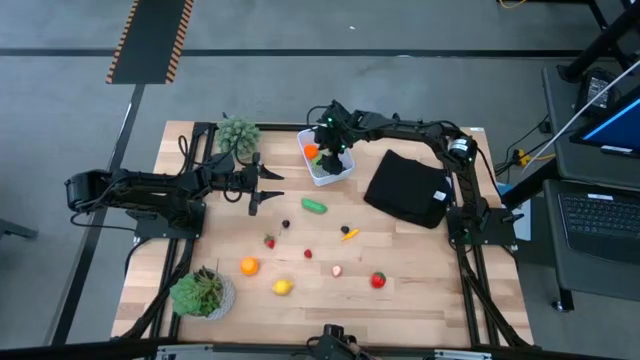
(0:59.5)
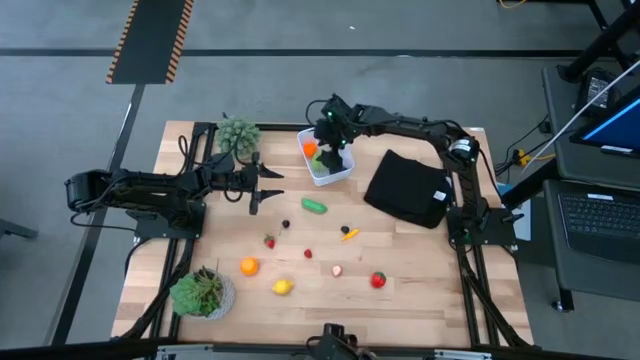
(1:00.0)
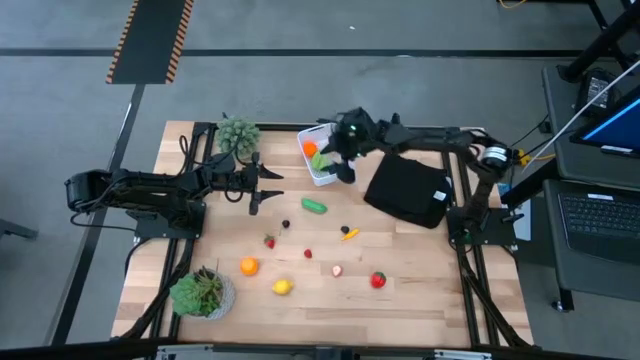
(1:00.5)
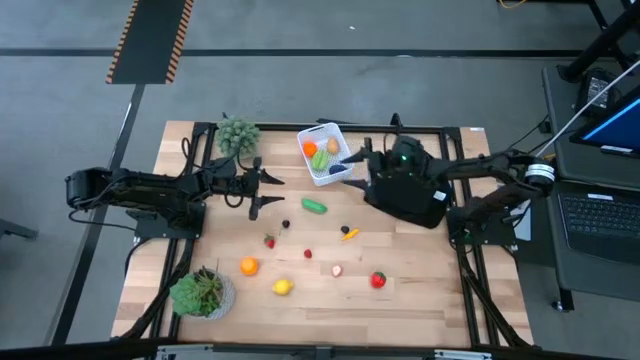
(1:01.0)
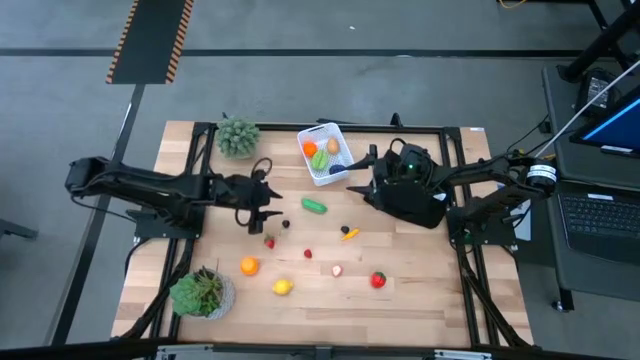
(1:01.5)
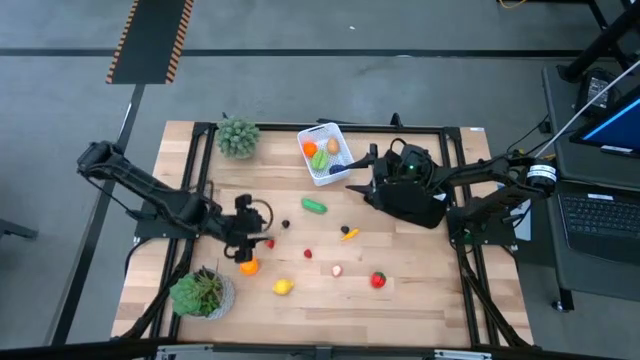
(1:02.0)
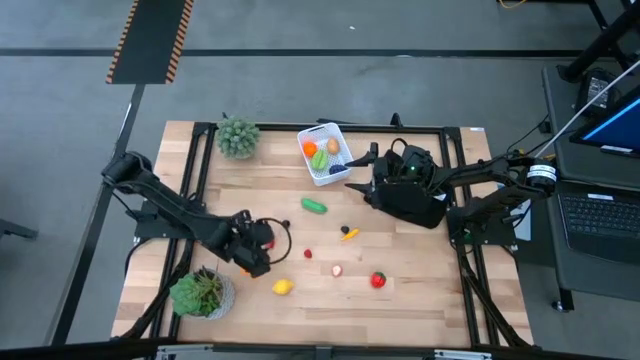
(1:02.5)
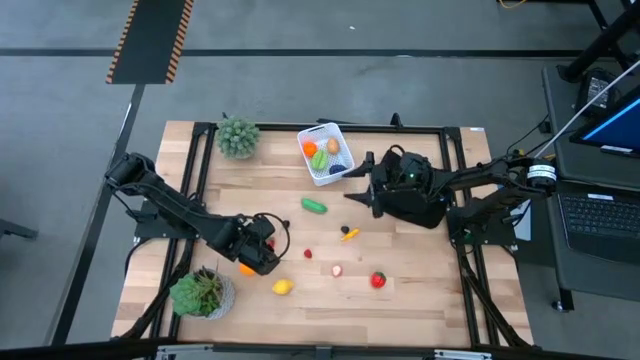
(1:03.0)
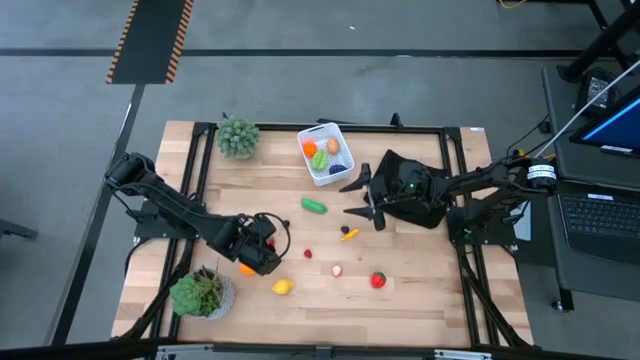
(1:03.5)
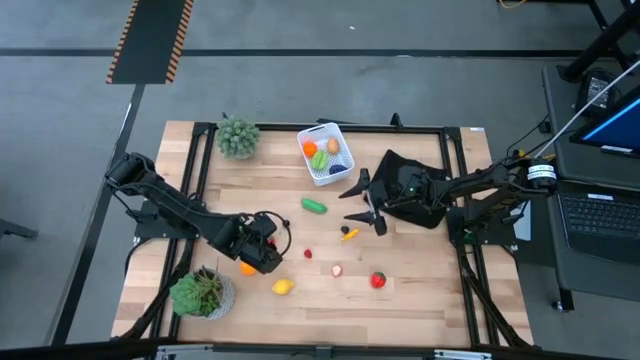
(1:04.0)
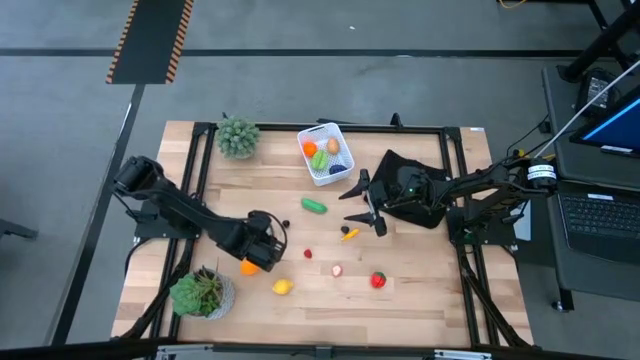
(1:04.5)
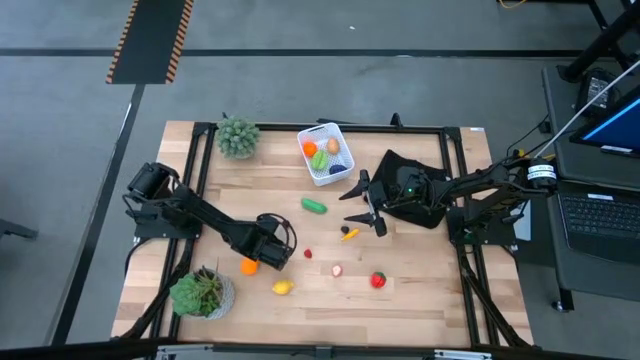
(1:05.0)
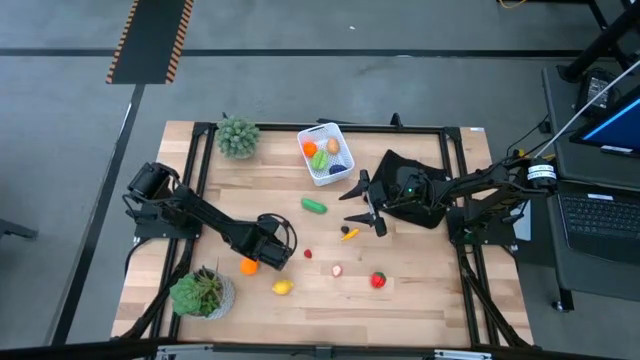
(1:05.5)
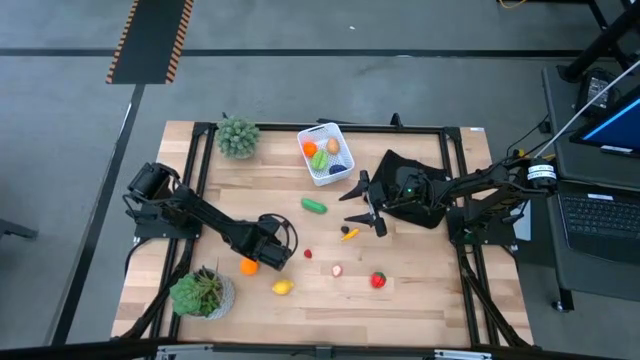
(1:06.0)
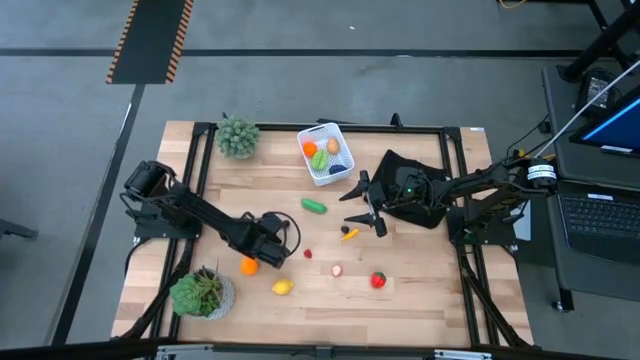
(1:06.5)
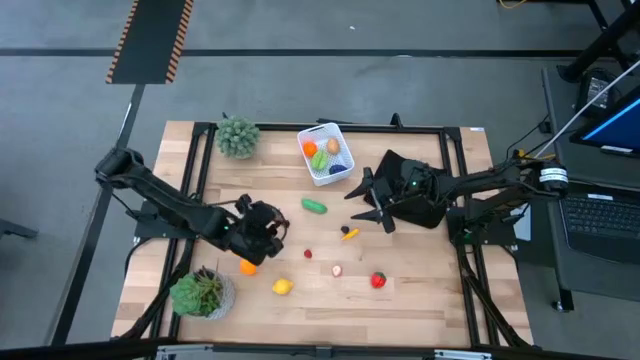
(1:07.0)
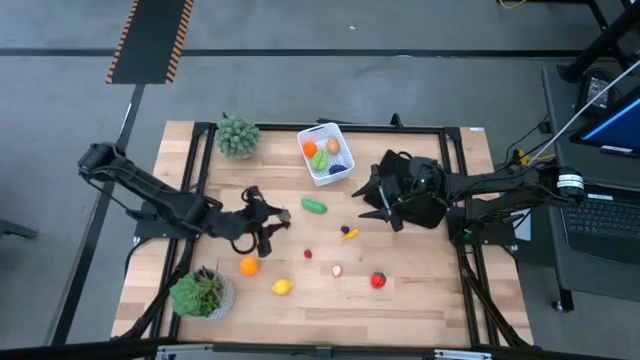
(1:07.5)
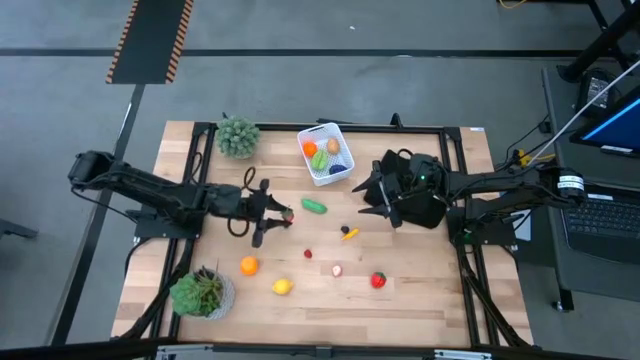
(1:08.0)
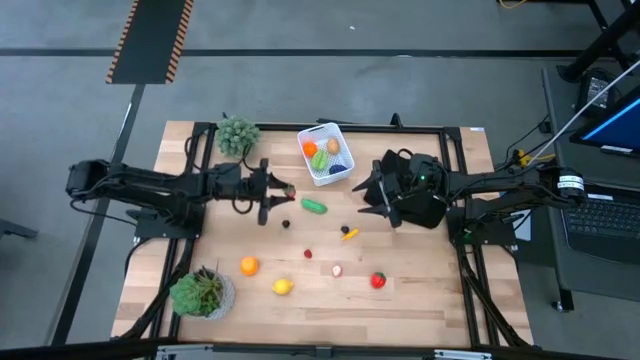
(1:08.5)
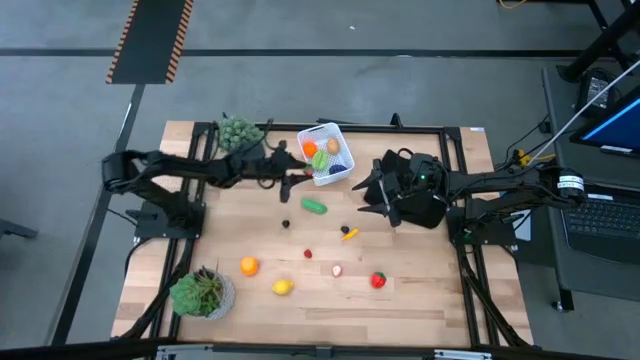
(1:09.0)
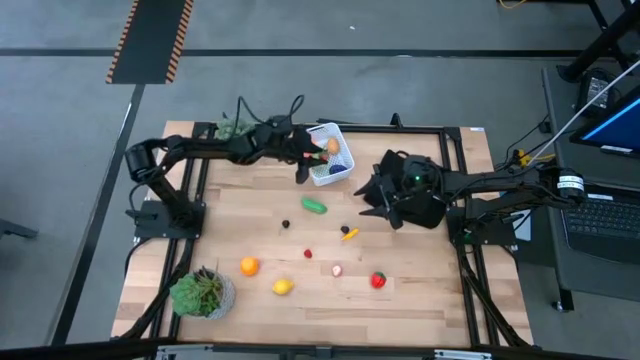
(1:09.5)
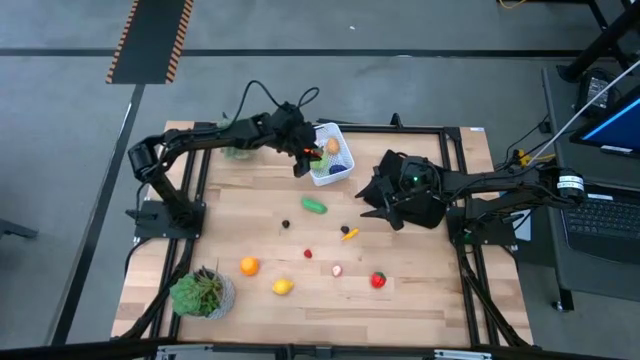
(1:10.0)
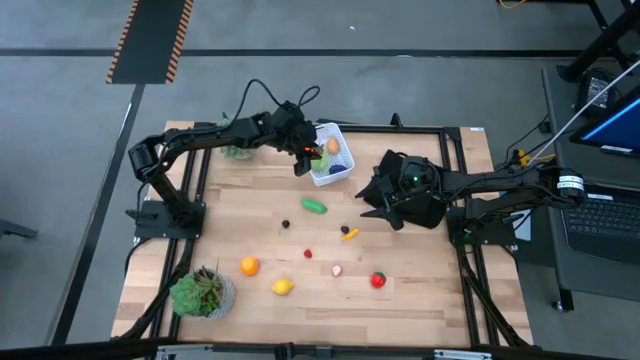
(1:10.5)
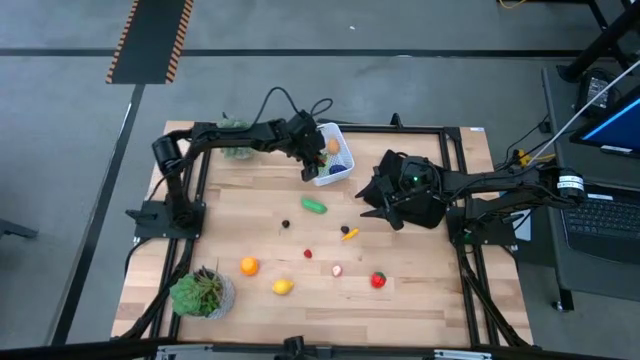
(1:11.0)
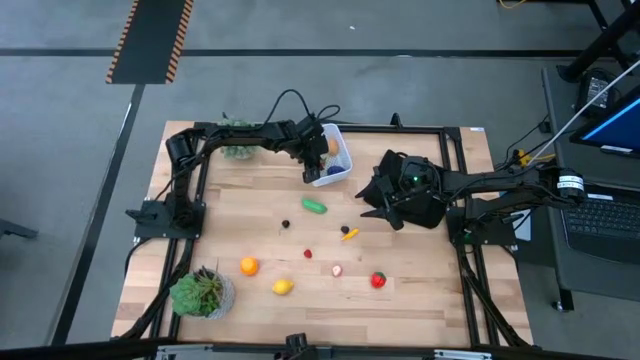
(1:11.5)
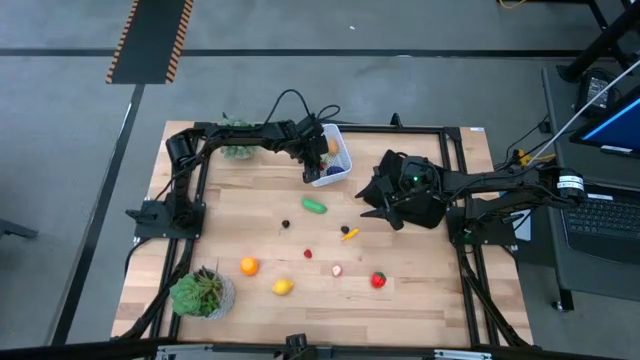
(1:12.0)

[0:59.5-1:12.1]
Task: Pick and placing Produce into tupperware
Put the top strawberry into the basket

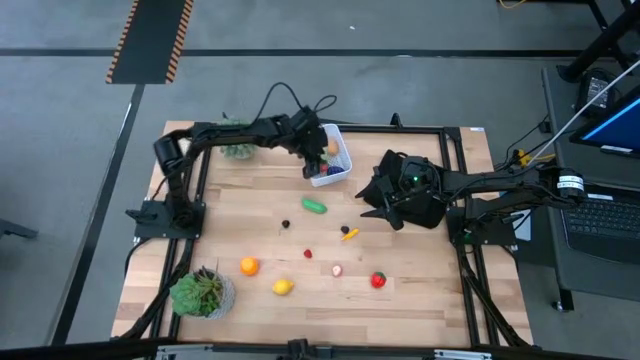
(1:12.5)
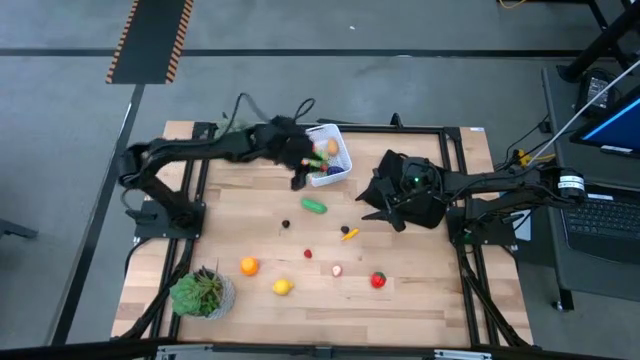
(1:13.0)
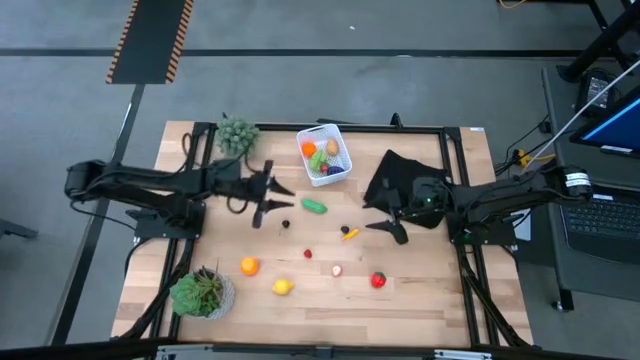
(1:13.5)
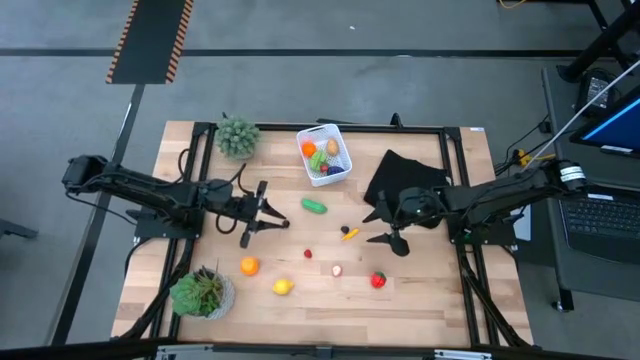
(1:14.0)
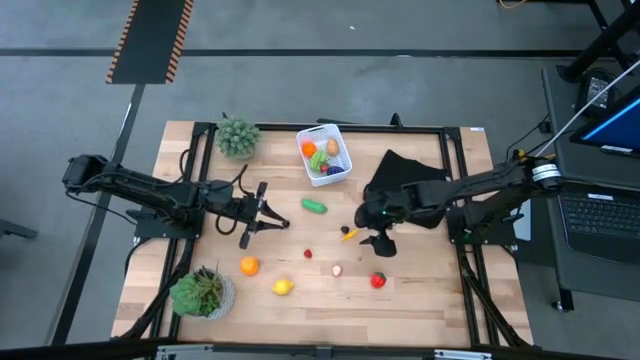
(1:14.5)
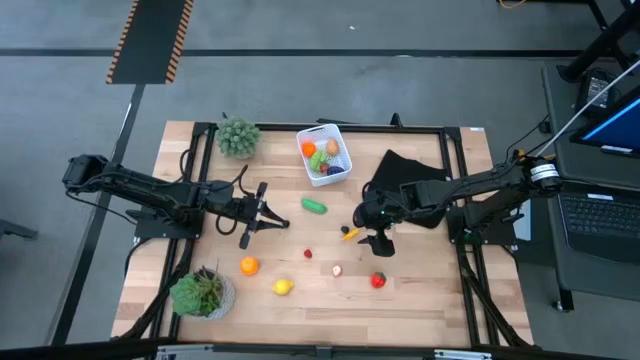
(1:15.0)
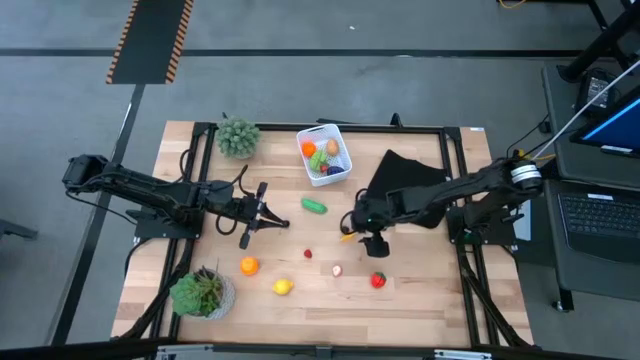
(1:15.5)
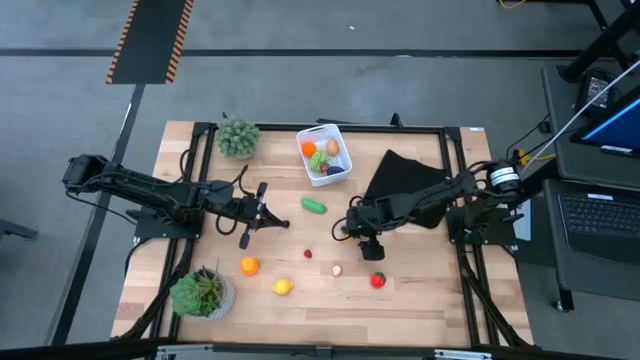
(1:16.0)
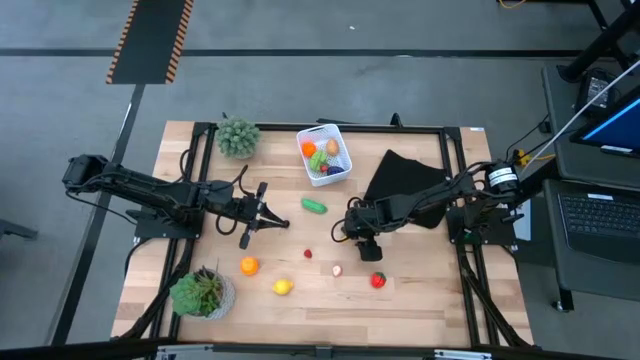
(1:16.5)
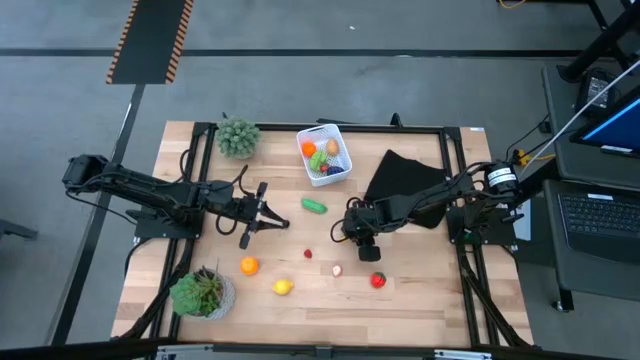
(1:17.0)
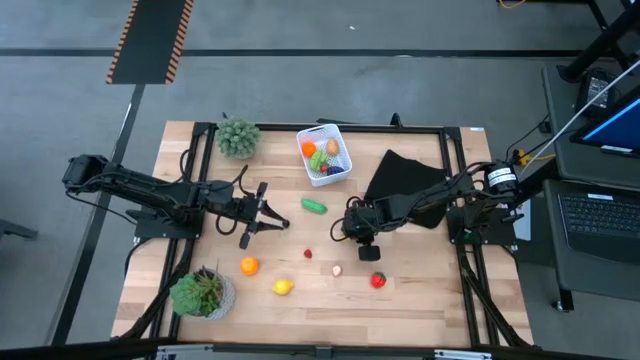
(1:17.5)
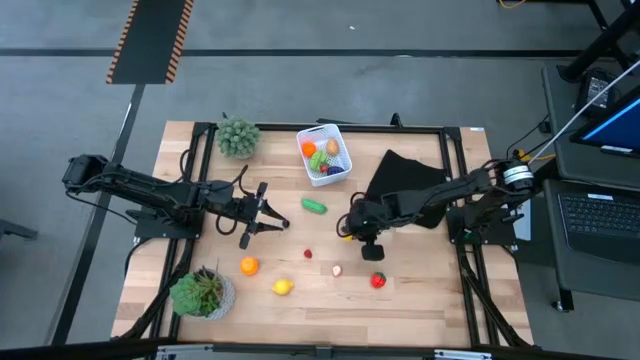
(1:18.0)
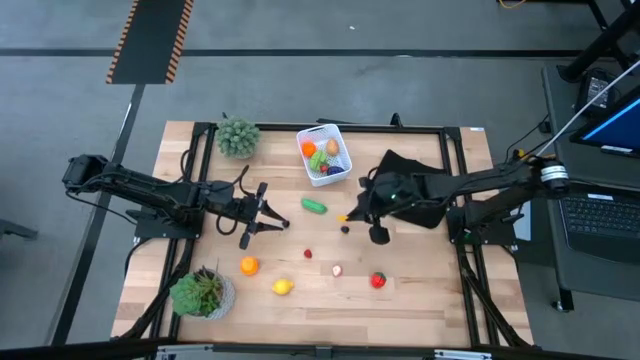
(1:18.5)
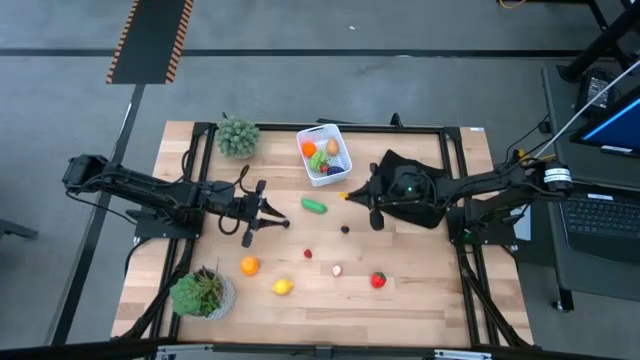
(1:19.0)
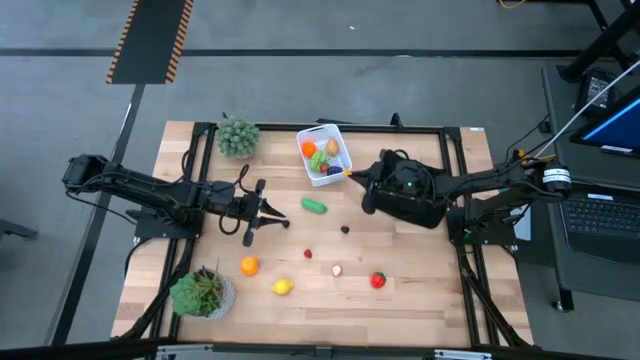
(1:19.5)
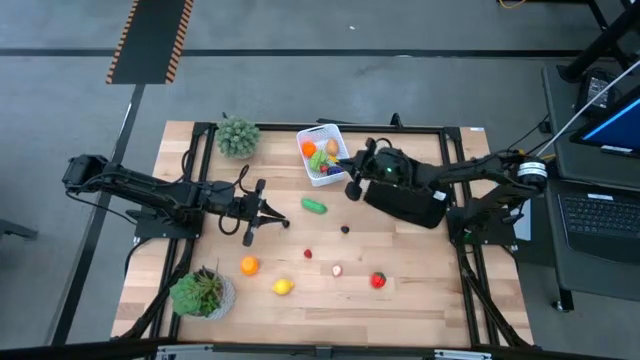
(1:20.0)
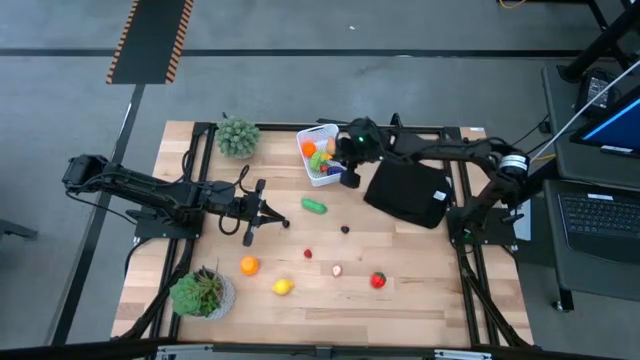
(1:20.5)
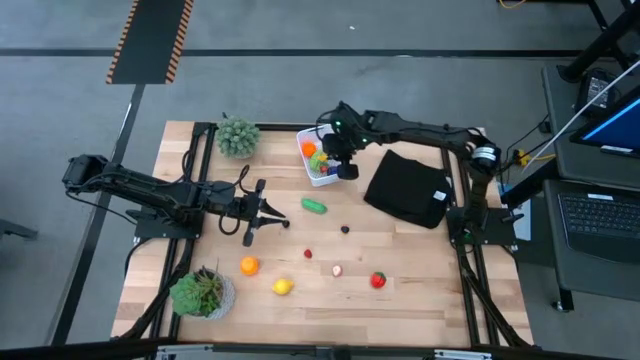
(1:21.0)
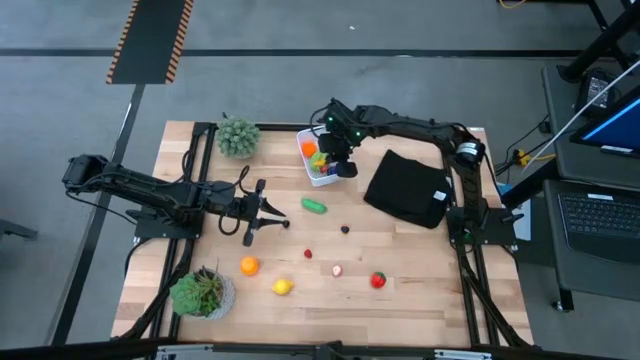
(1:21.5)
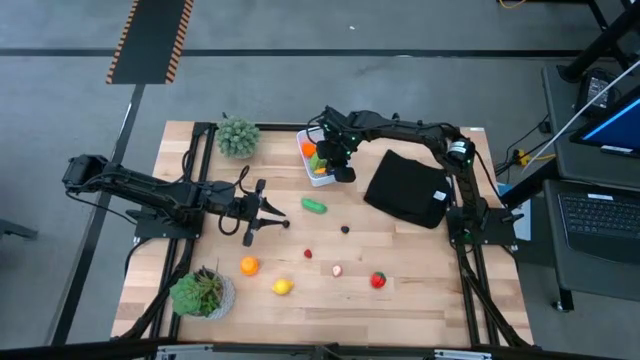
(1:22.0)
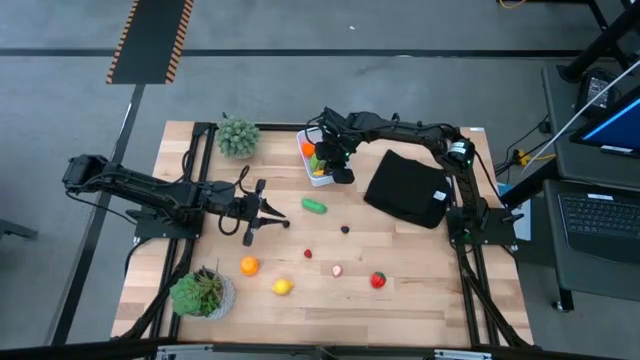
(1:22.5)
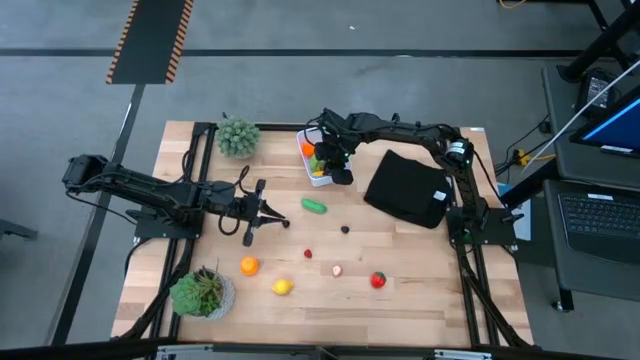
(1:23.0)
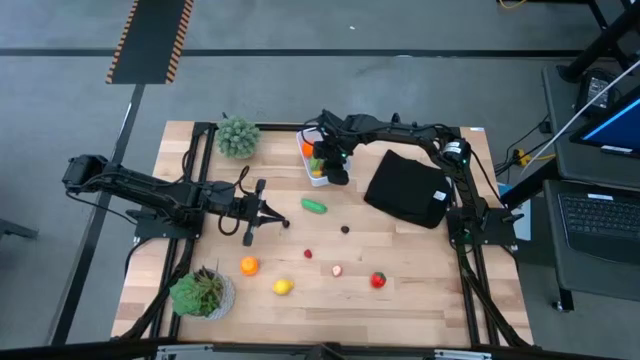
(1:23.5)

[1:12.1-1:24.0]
Put the corn into the basket
